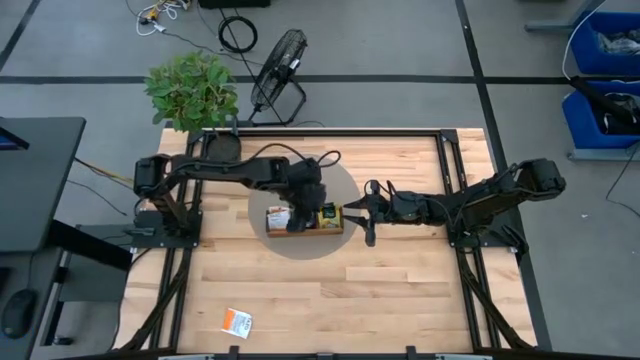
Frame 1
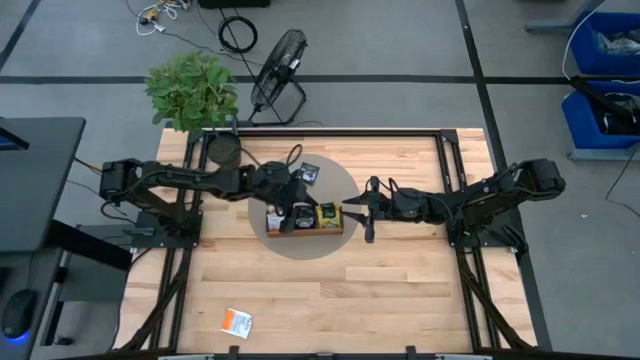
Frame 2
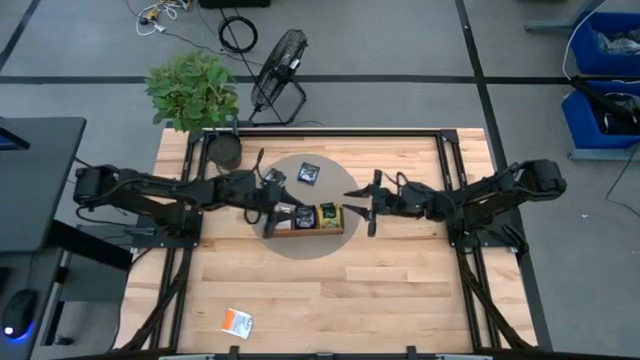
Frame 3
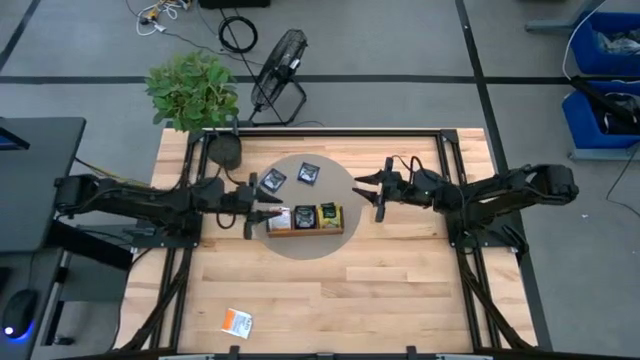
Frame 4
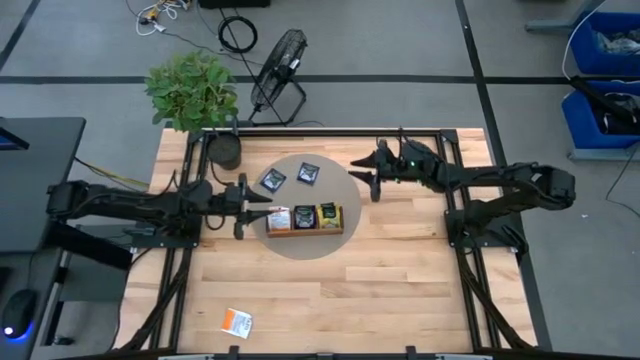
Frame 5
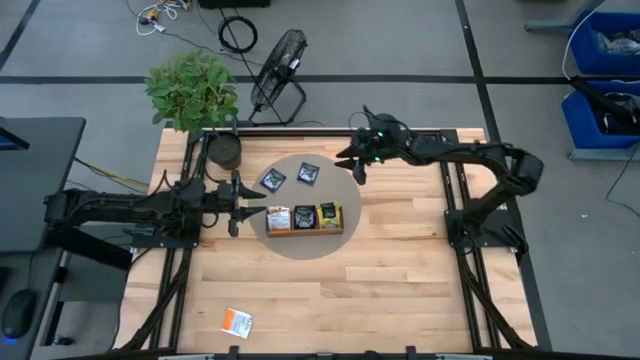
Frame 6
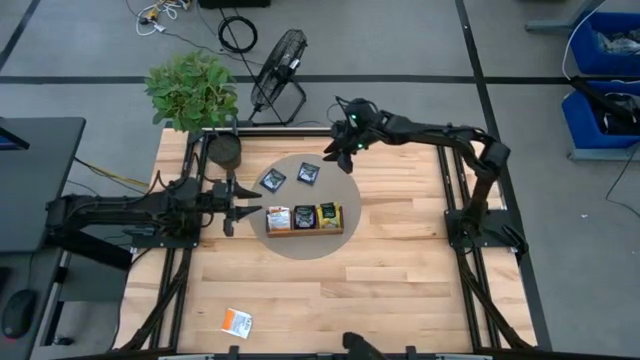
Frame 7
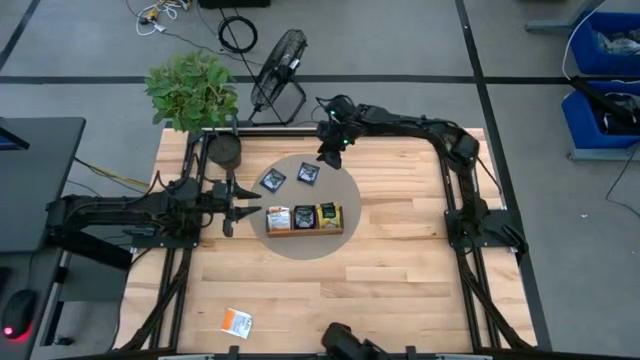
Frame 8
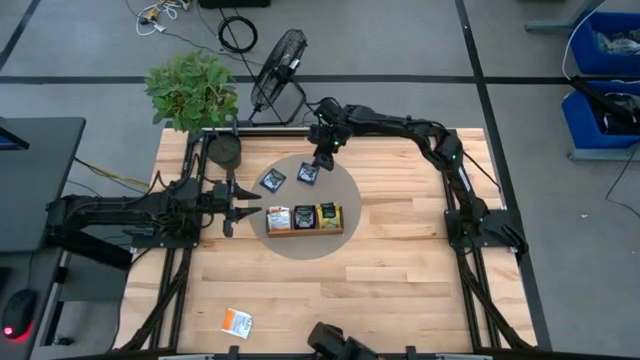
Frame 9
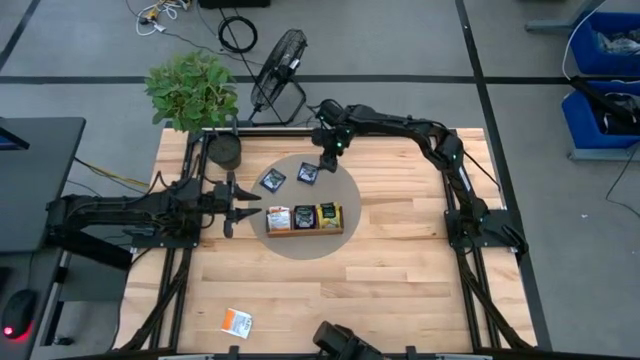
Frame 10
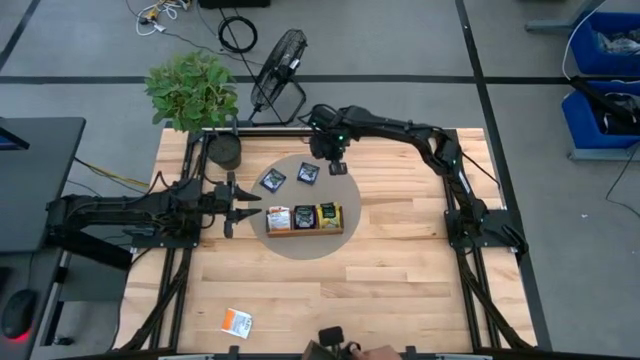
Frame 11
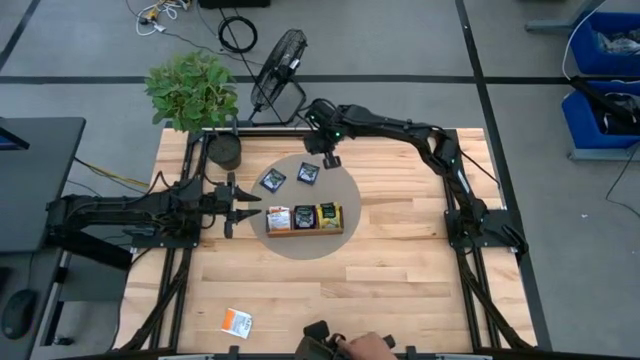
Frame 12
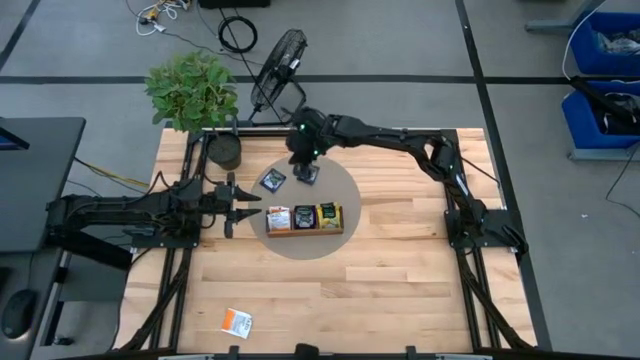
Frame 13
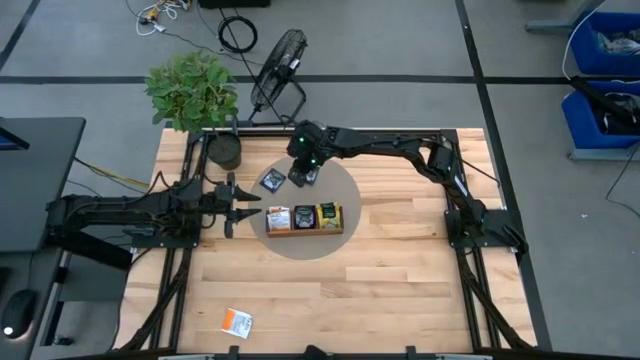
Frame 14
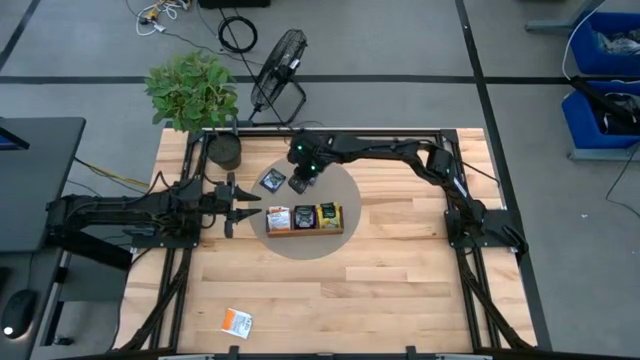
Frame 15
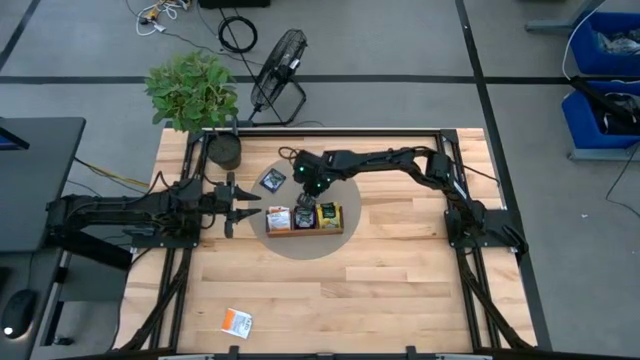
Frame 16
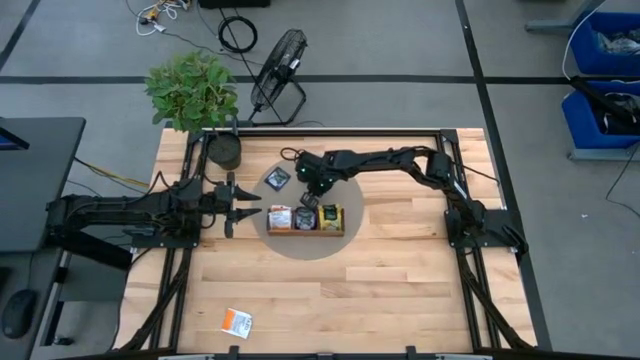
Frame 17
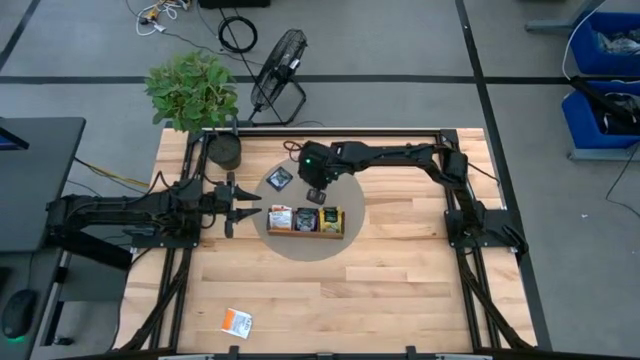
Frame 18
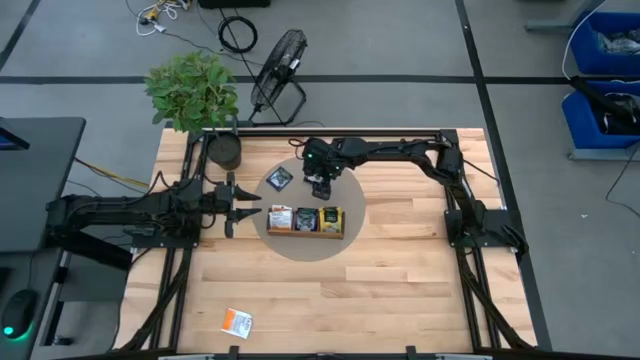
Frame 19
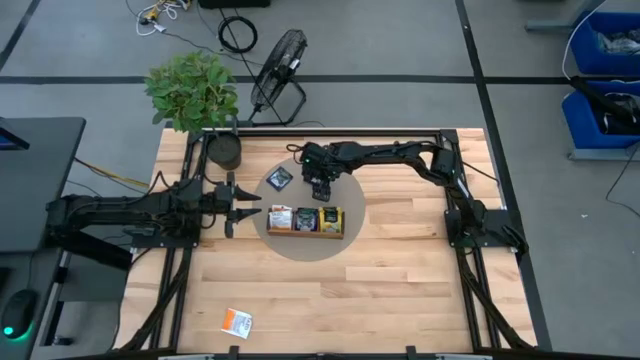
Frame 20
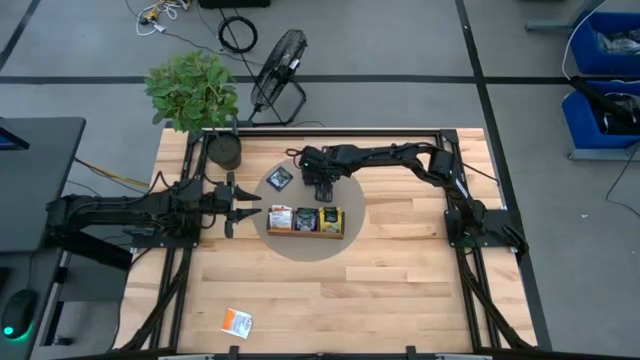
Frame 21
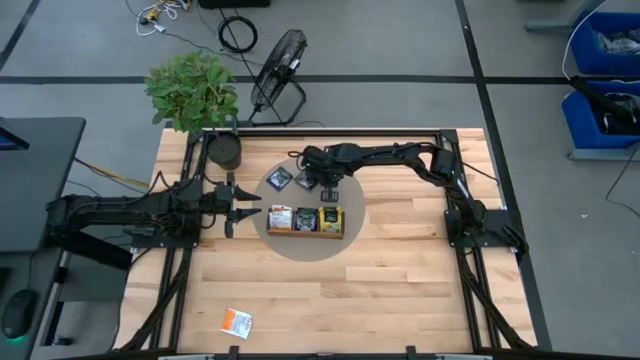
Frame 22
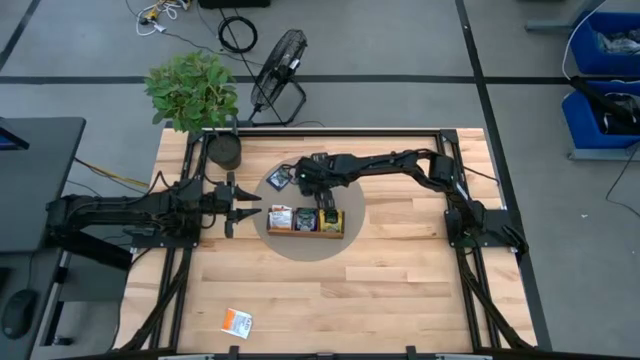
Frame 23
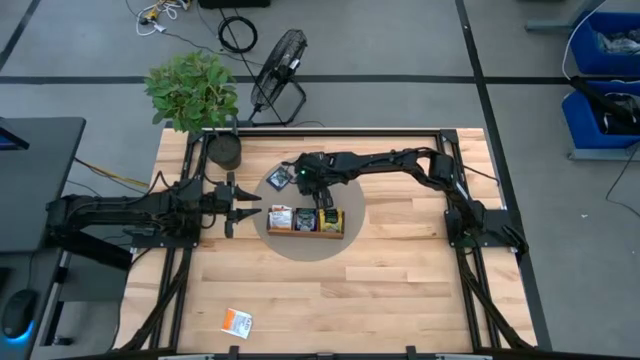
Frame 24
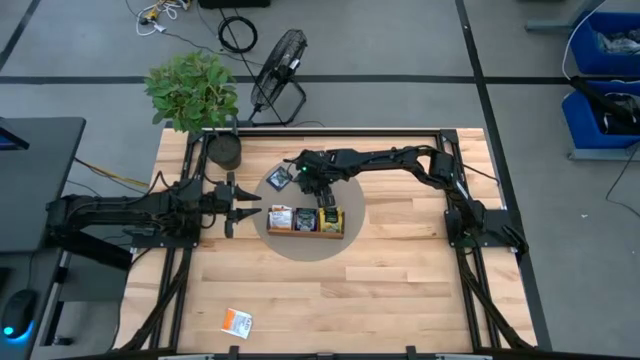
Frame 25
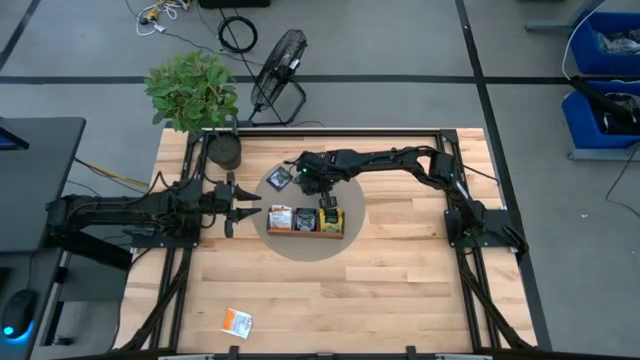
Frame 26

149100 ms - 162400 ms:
Task: Pick & Place Tea
Put the right purple tea bag into the middle compartment of the wooden organizer

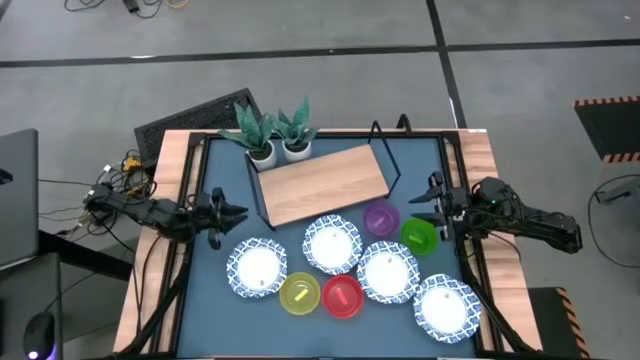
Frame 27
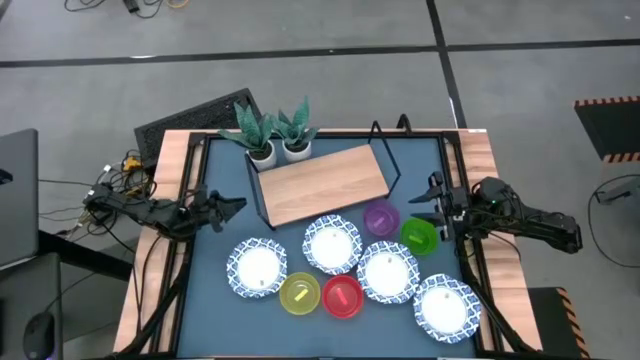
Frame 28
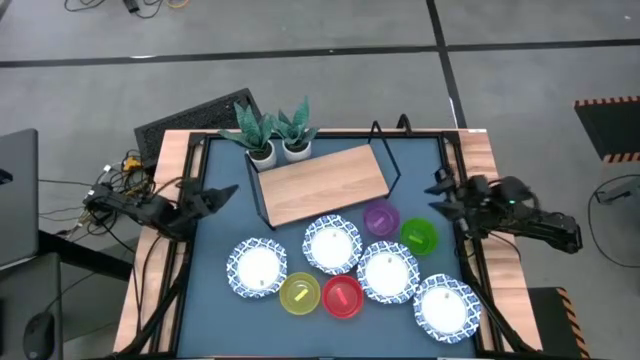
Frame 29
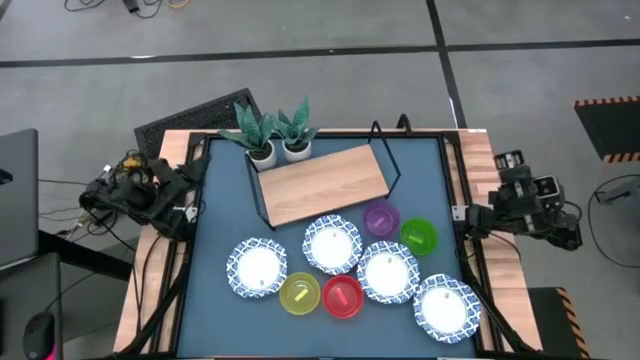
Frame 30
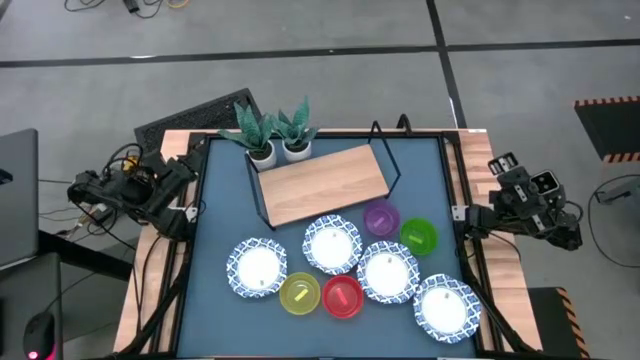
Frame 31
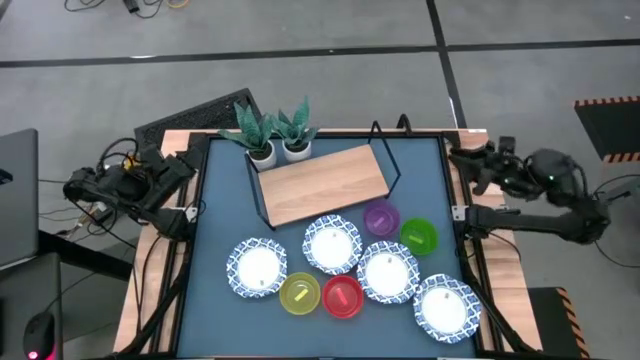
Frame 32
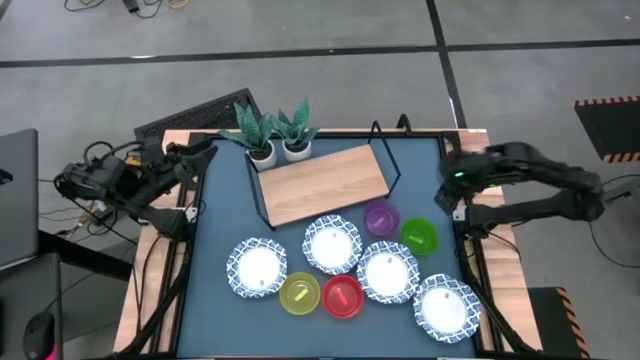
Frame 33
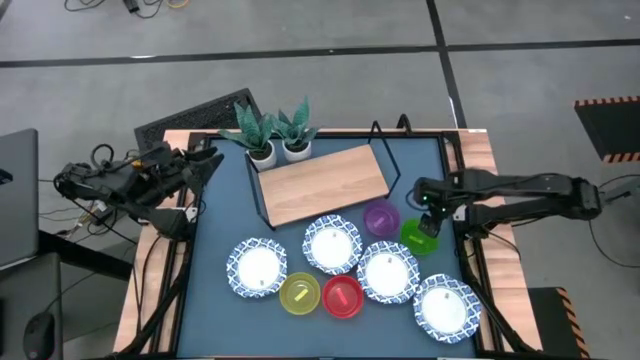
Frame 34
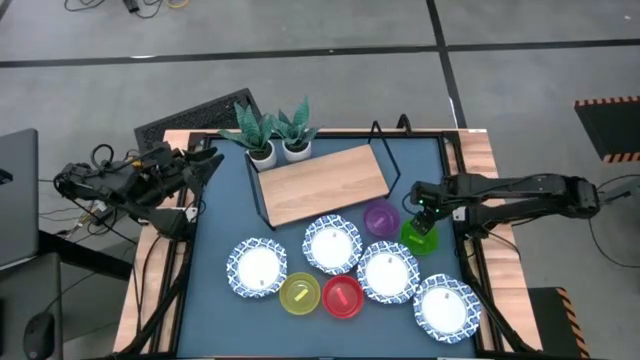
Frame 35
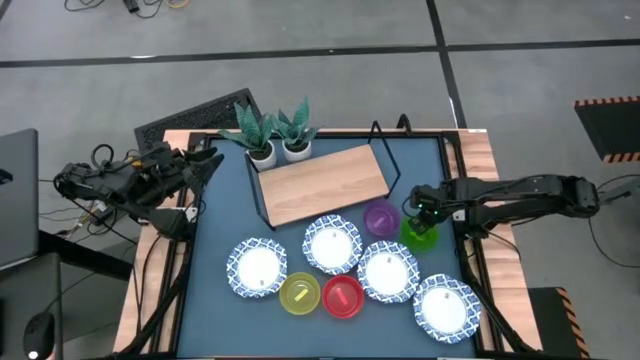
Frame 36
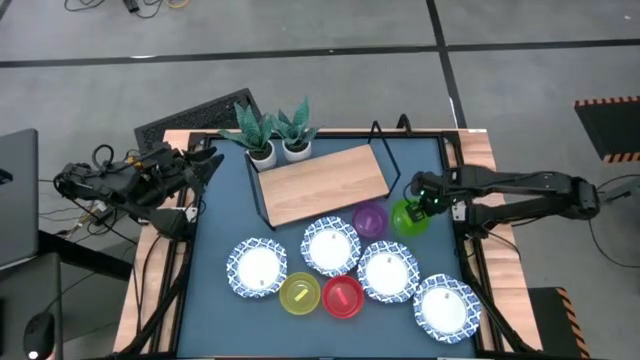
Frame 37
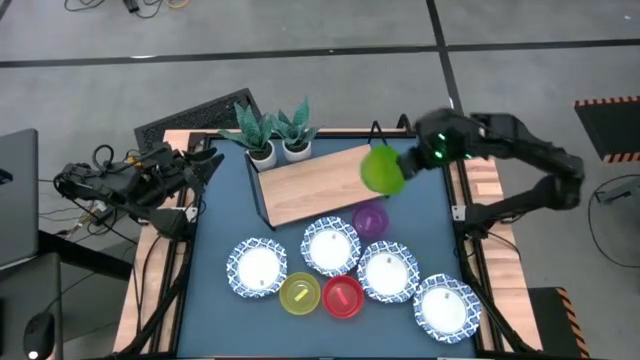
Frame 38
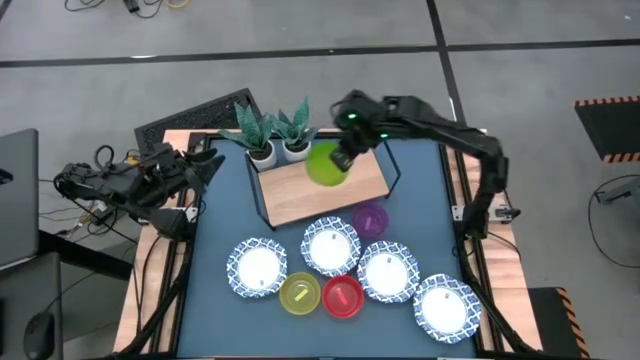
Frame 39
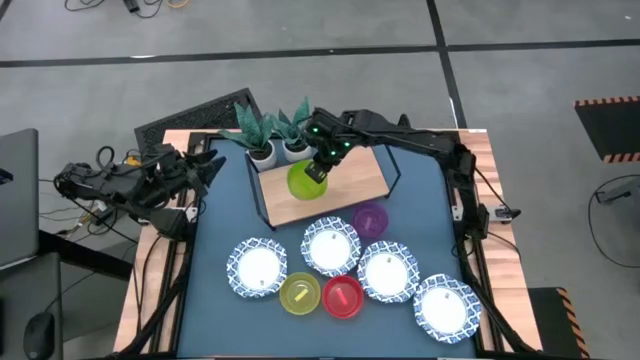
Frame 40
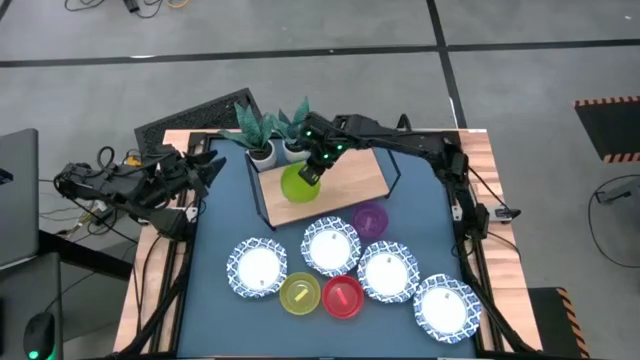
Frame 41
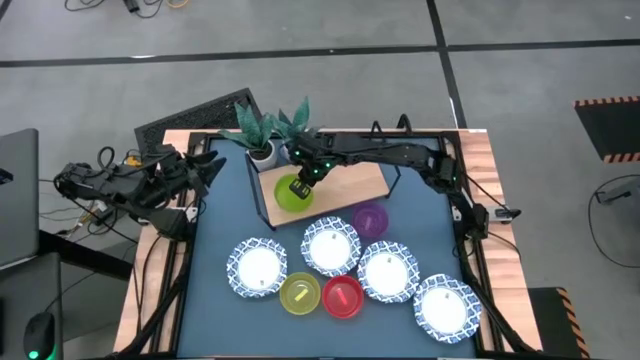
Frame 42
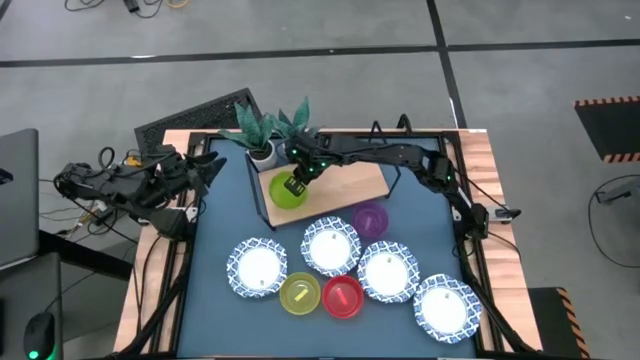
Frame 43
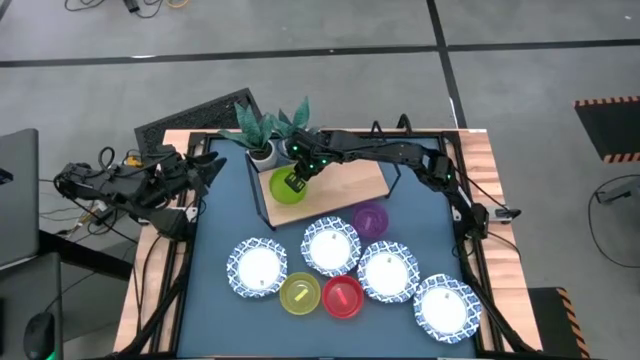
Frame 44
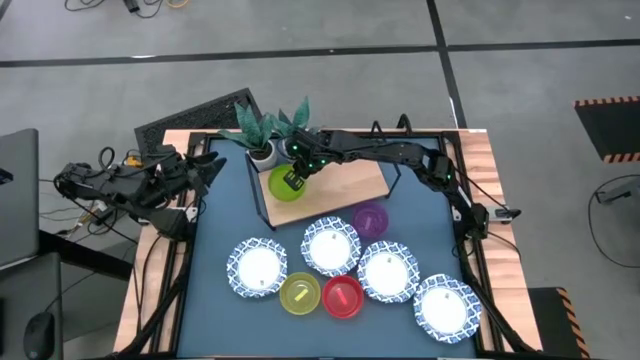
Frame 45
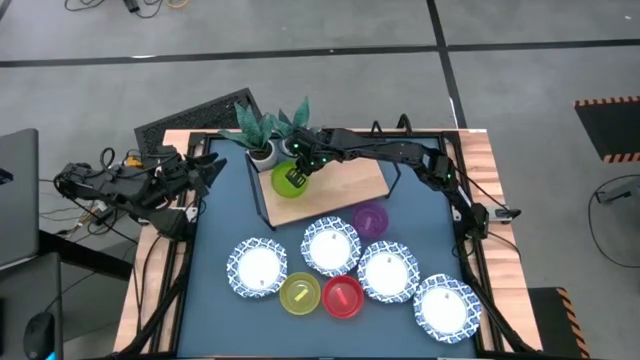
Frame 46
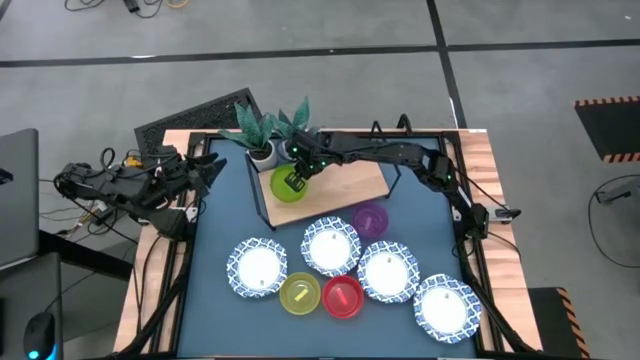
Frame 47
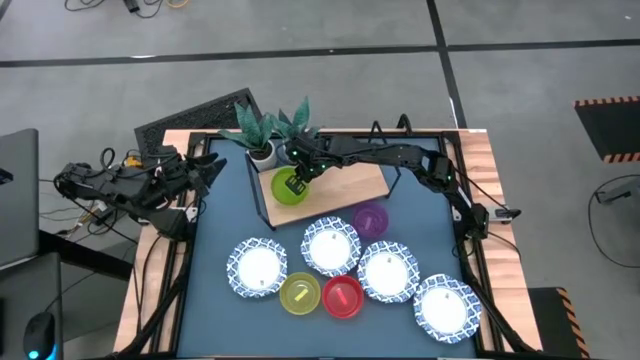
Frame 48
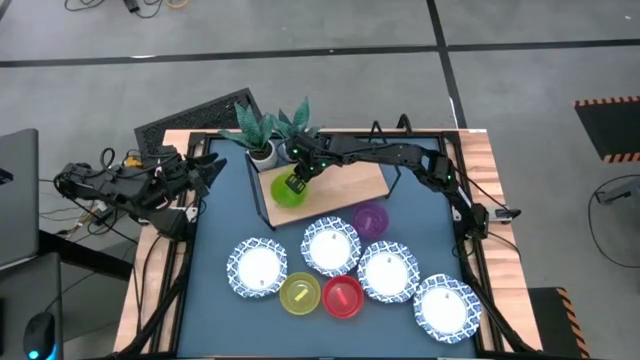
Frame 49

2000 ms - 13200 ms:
Task: Place and stack bowls onto a shelf
Put the green bowl on the shelf
